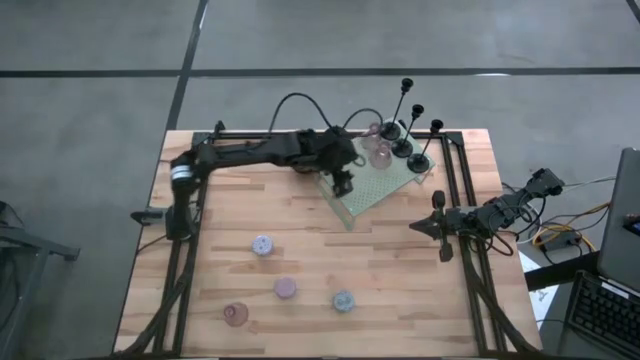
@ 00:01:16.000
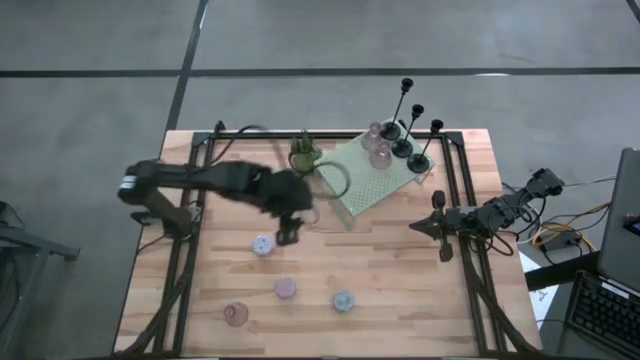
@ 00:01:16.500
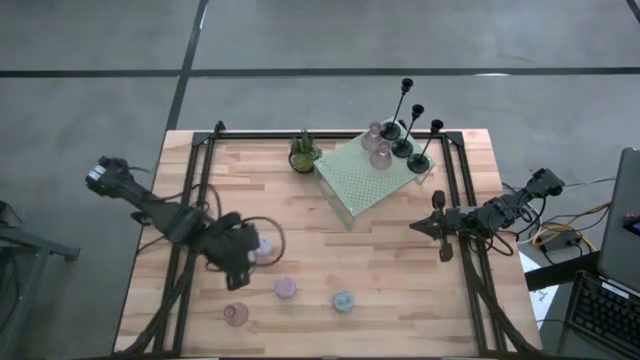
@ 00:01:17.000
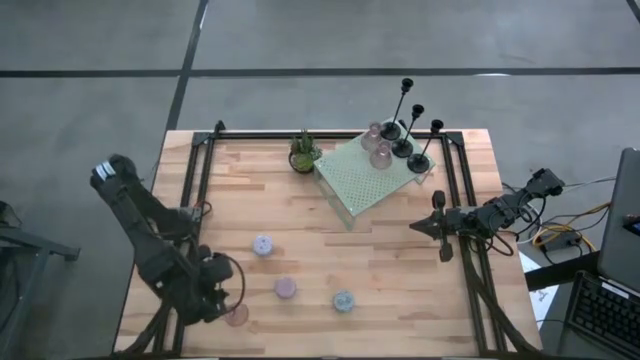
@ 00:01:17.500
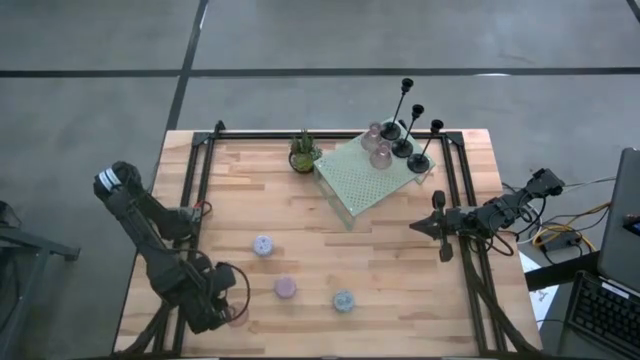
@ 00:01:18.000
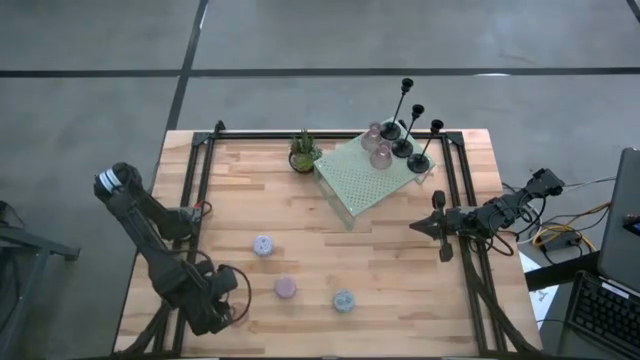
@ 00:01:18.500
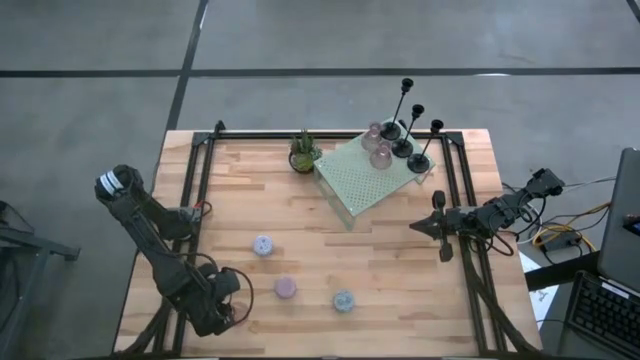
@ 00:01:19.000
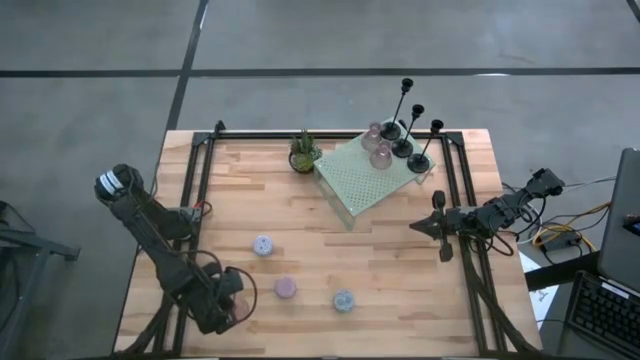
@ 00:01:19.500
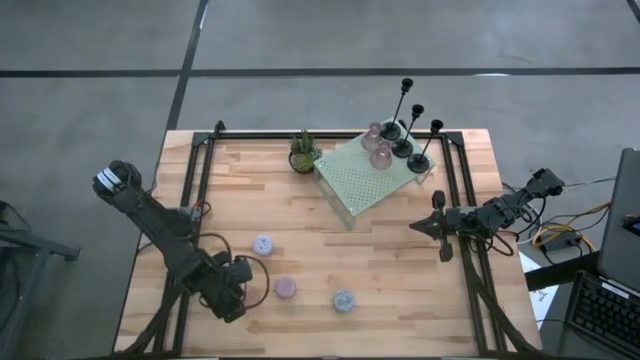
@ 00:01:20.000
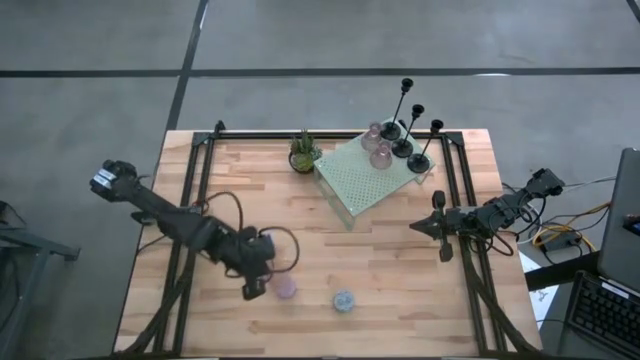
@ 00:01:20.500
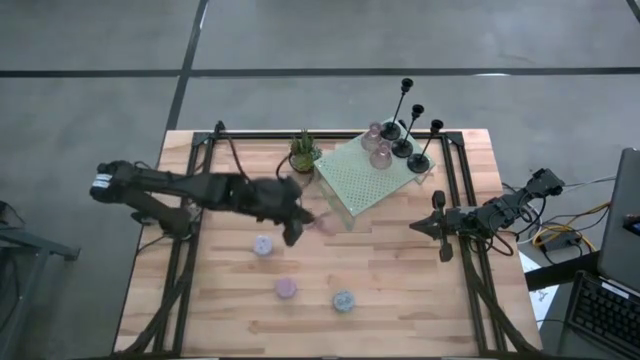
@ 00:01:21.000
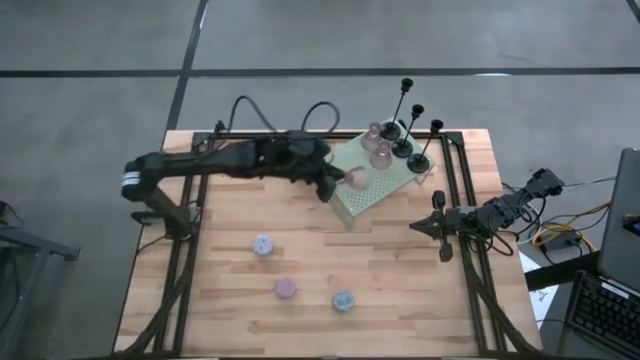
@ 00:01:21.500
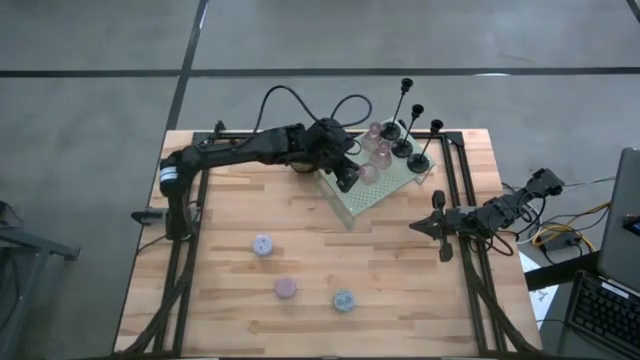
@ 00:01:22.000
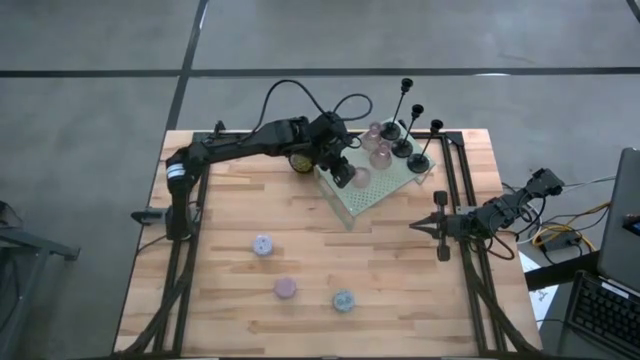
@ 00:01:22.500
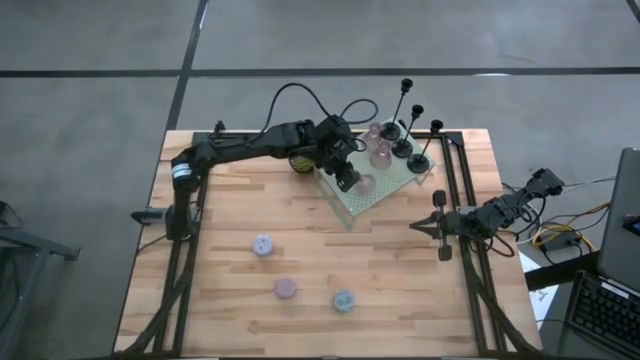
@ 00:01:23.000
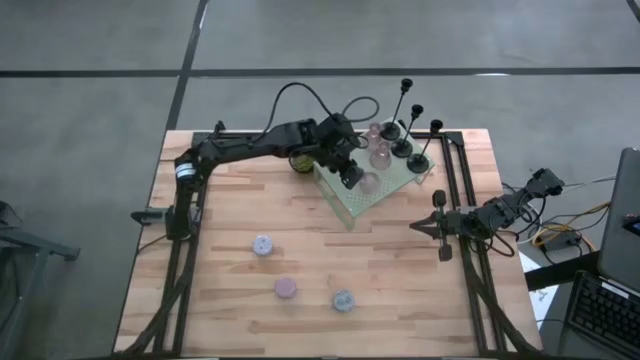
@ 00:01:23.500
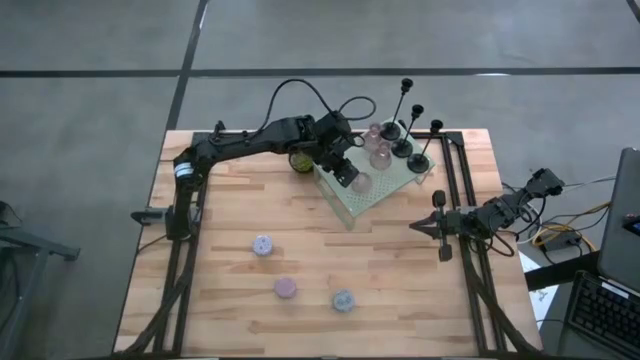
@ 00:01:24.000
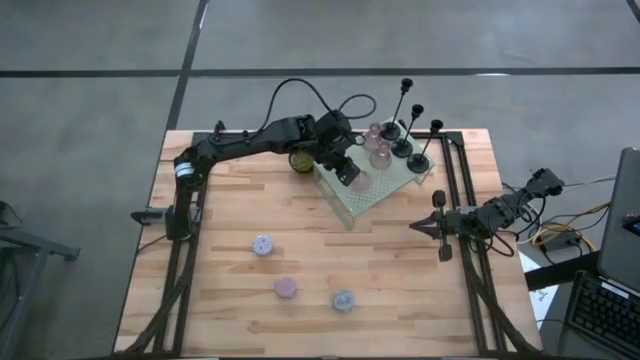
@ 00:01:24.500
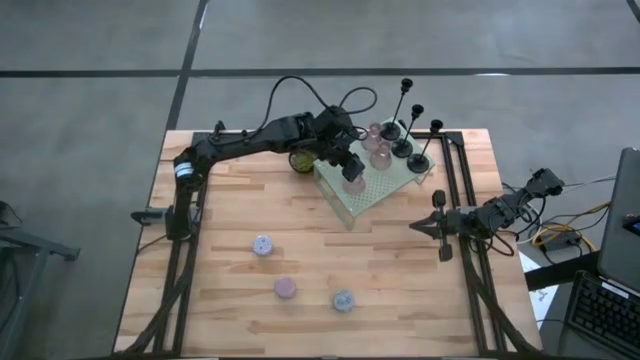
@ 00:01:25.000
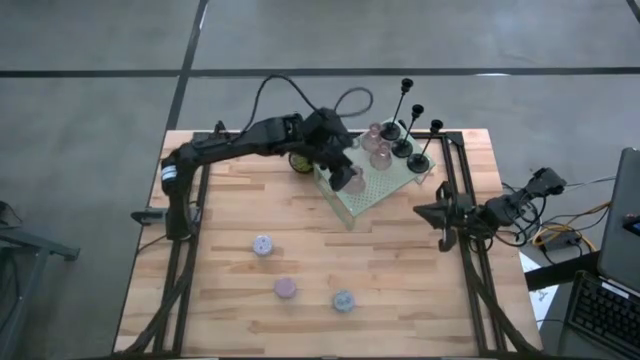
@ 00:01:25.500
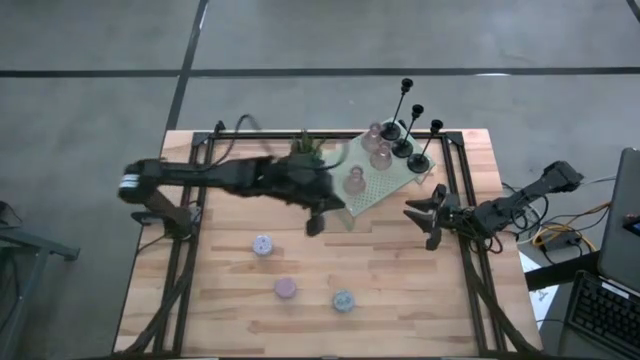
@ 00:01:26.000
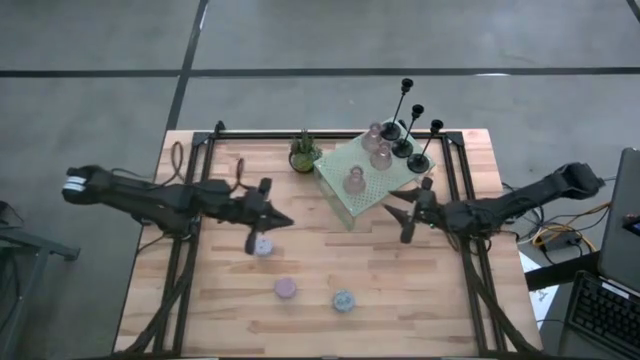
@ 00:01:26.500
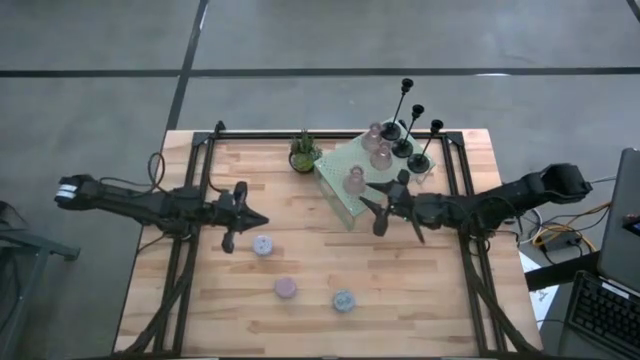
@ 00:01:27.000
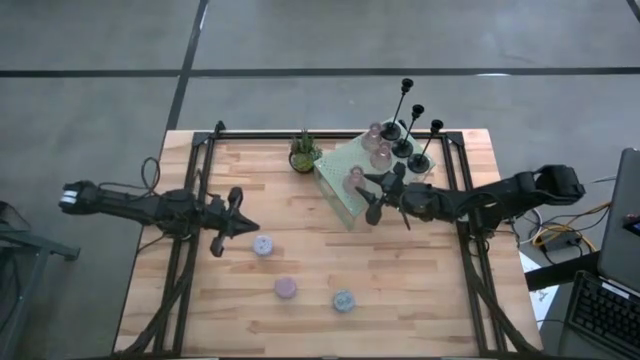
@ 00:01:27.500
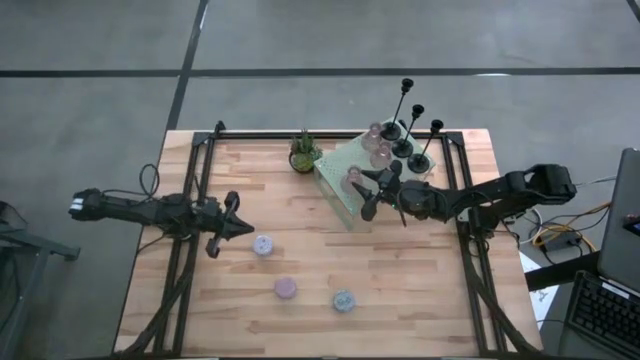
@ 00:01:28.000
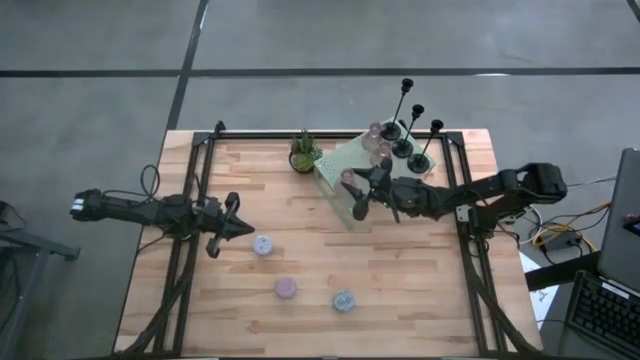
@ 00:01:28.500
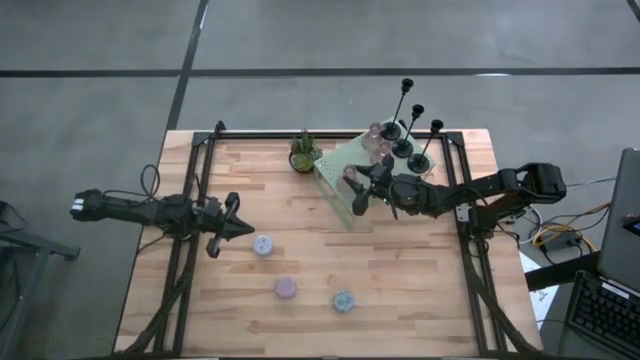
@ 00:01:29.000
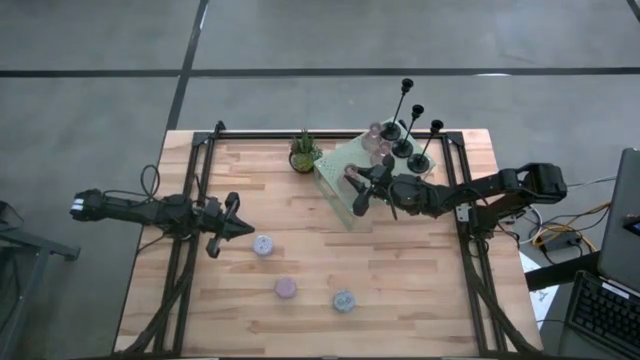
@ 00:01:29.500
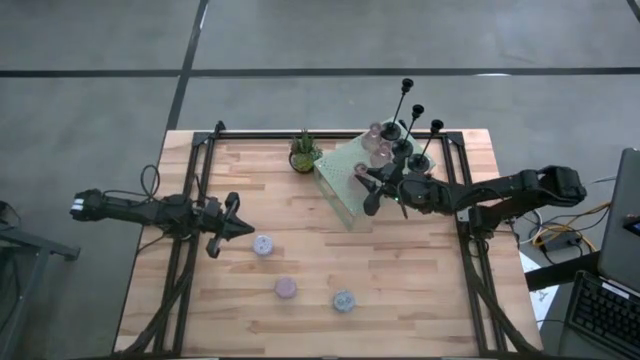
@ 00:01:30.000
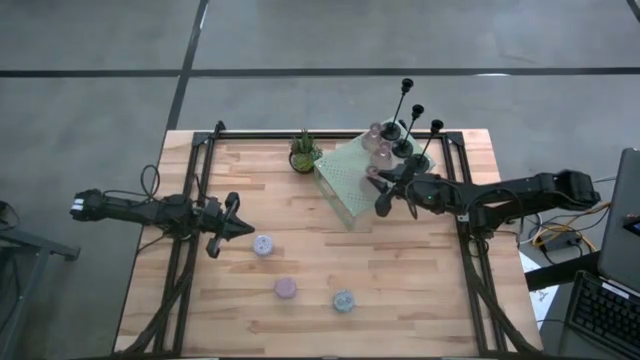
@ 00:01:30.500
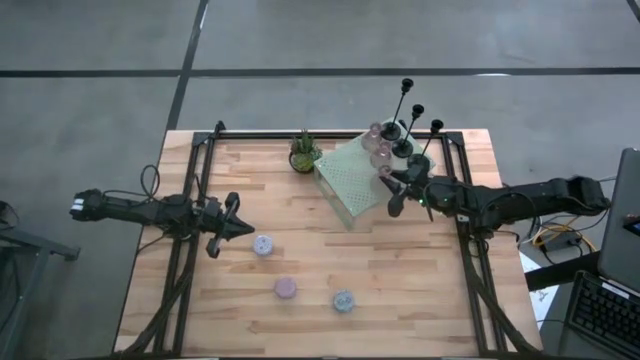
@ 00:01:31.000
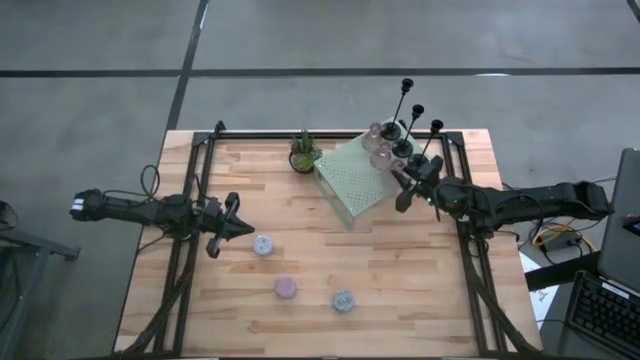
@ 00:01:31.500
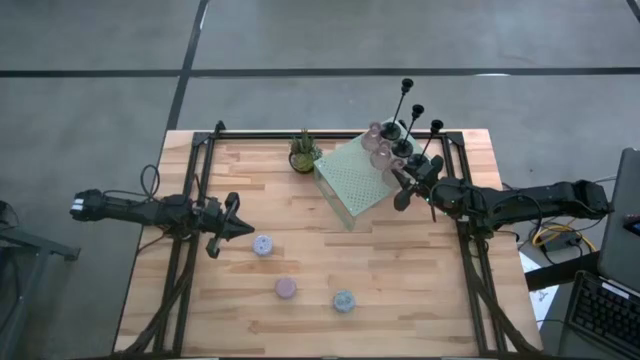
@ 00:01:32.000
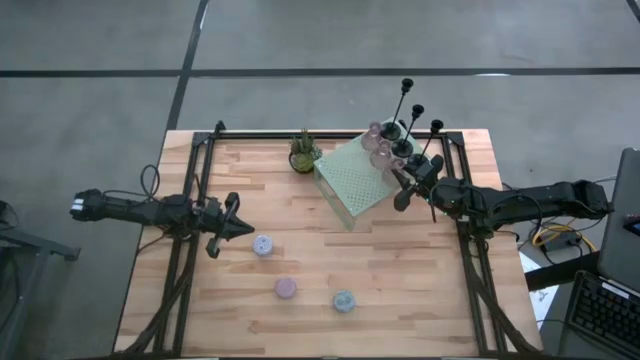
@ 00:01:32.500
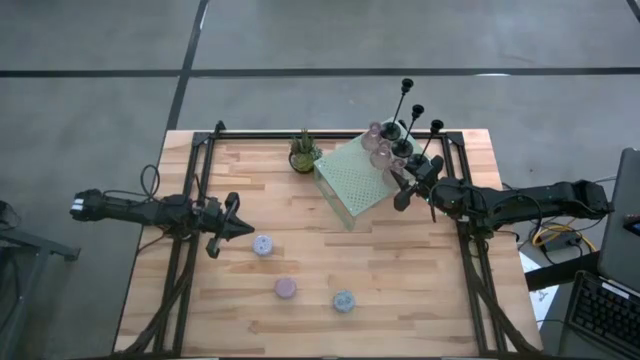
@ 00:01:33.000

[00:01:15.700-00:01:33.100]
Task: Pick & Place candle stick holders
Put the pink candle holder on the shelf aligned with the other pink candle holders

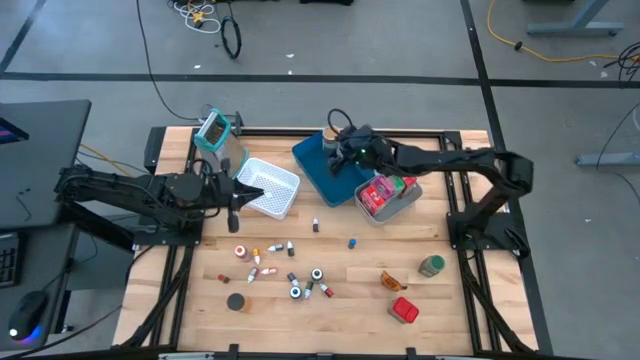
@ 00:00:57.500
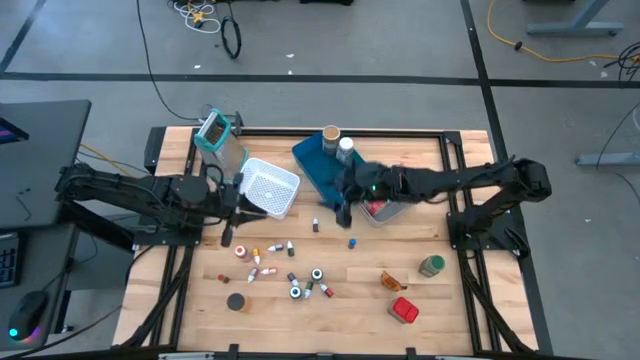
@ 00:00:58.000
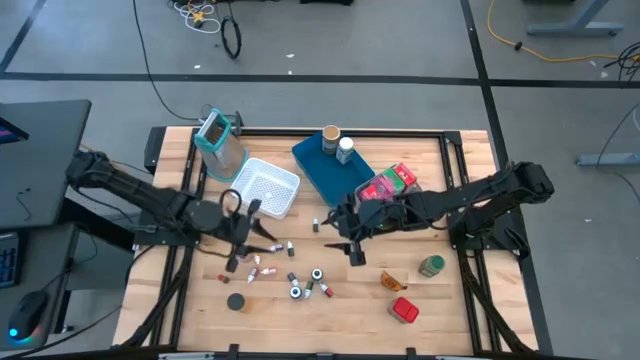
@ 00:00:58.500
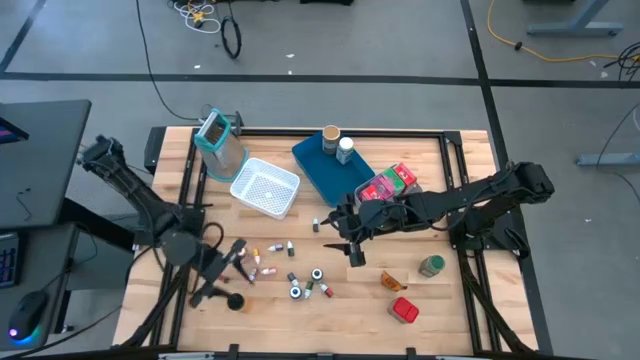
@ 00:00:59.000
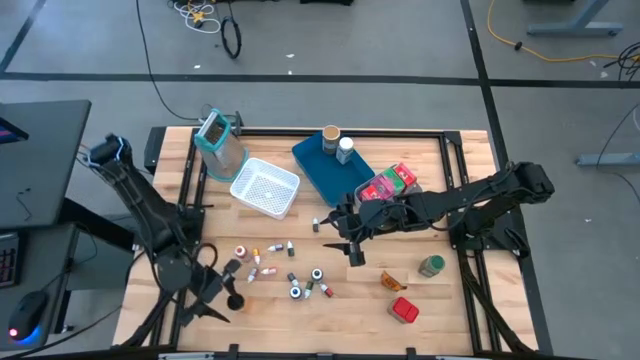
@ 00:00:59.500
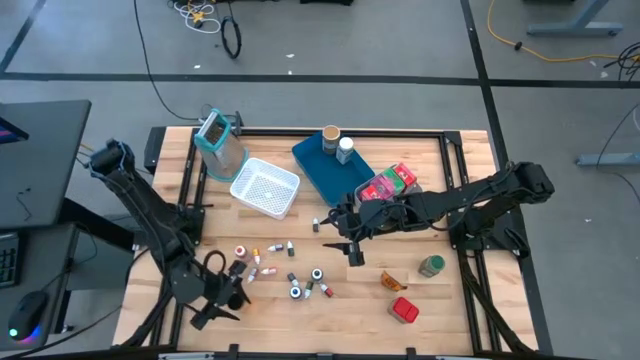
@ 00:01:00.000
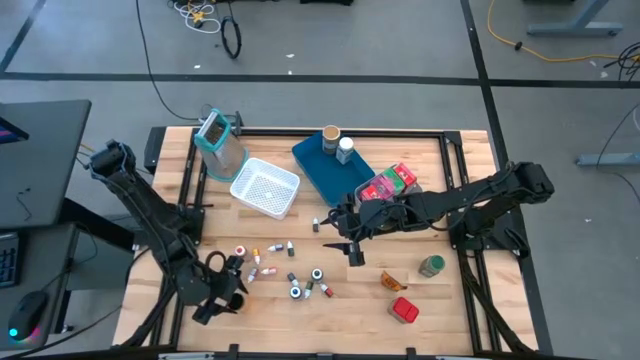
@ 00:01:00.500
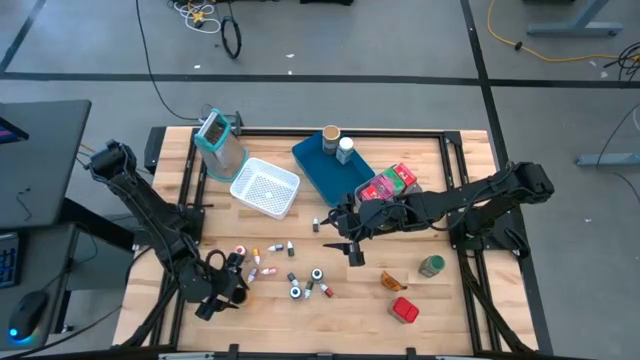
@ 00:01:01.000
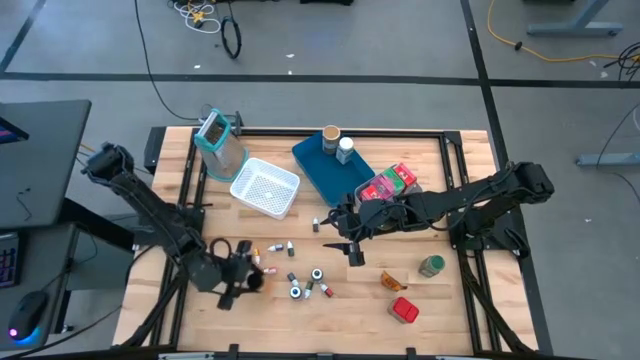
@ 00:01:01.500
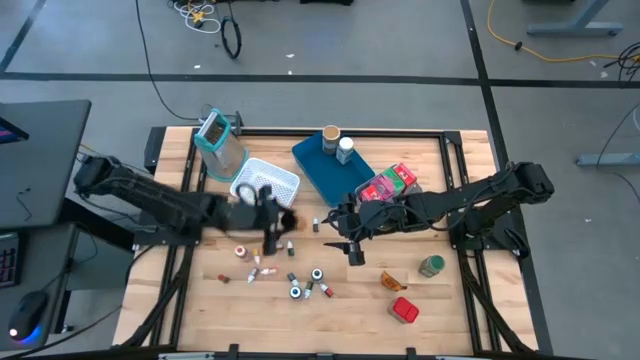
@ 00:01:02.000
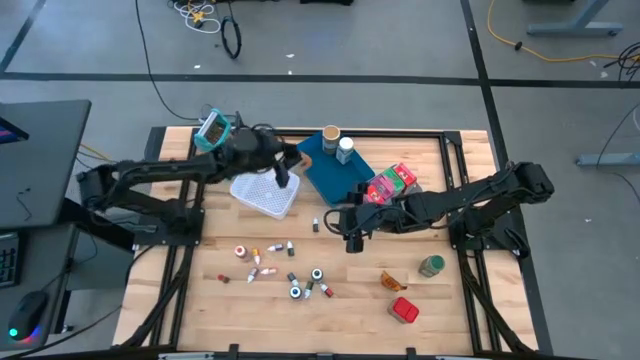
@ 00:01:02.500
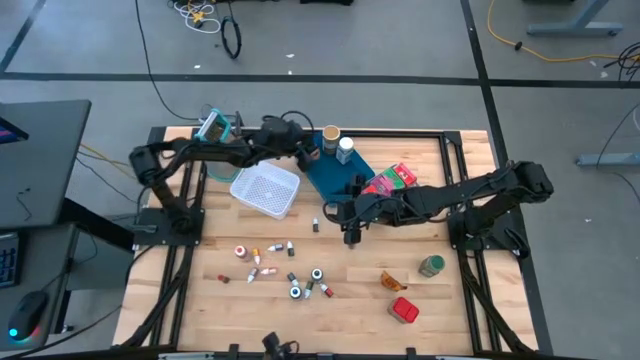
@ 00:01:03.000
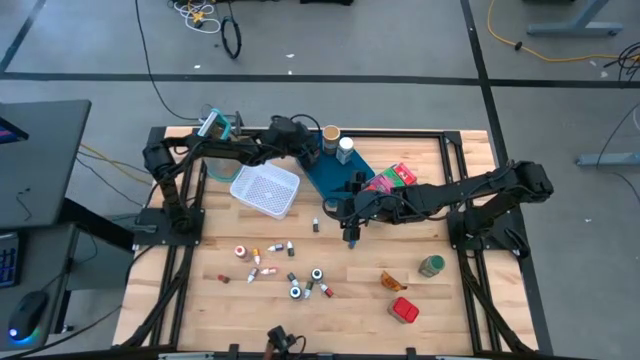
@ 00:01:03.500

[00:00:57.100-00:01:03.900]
Task: Pick & Place Kitchen Items
Put the orange seasoning bottle into the blue bin
